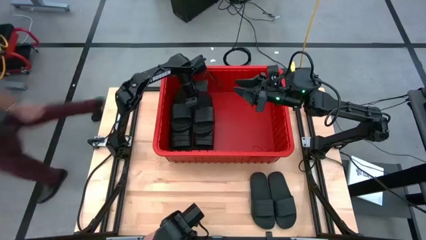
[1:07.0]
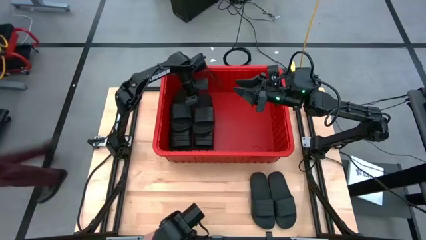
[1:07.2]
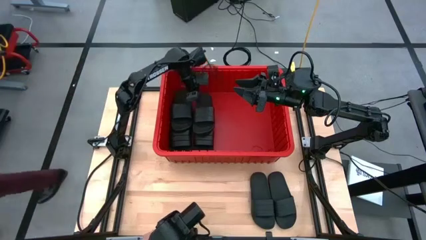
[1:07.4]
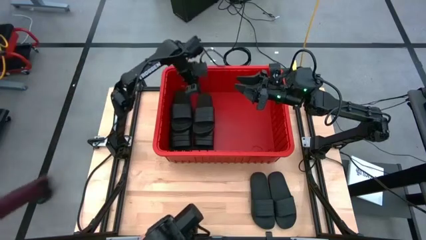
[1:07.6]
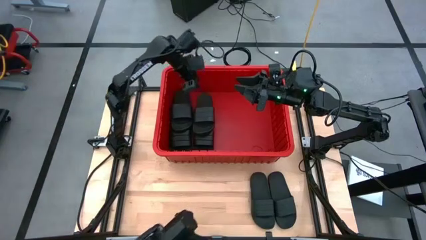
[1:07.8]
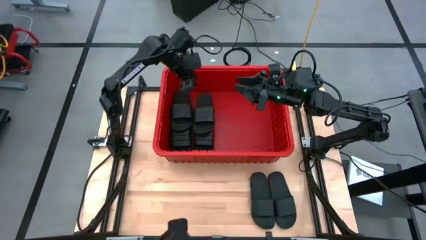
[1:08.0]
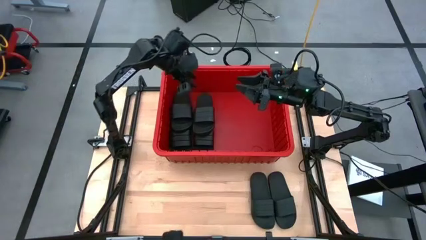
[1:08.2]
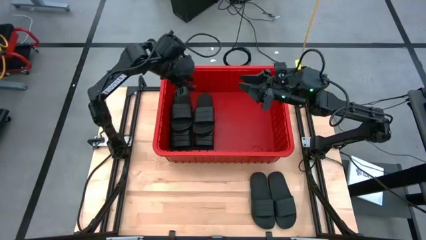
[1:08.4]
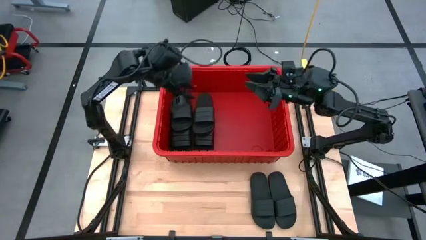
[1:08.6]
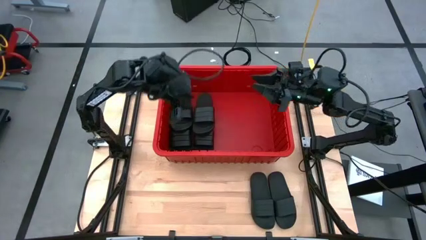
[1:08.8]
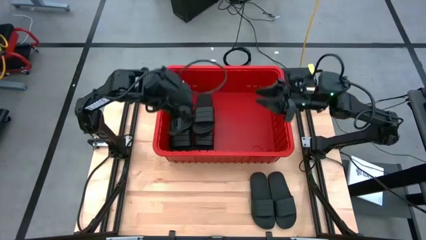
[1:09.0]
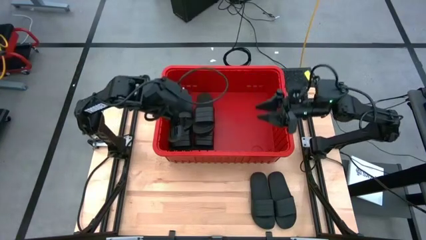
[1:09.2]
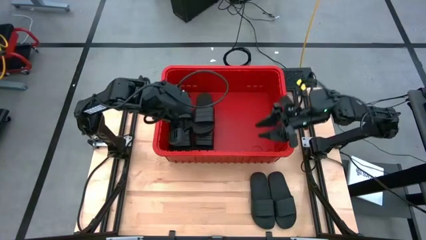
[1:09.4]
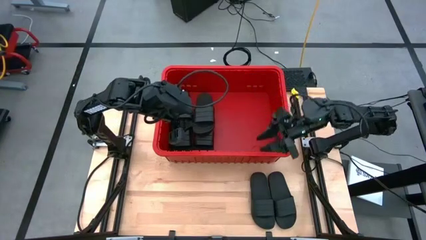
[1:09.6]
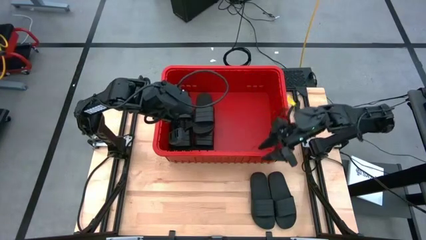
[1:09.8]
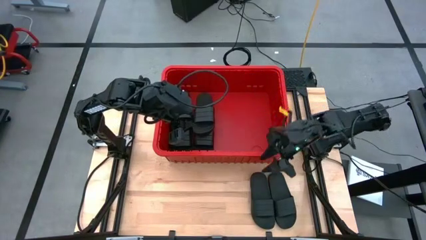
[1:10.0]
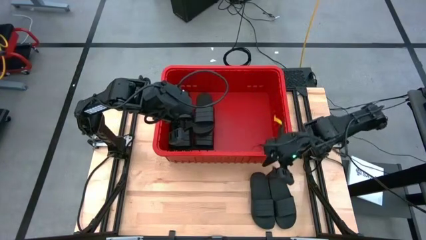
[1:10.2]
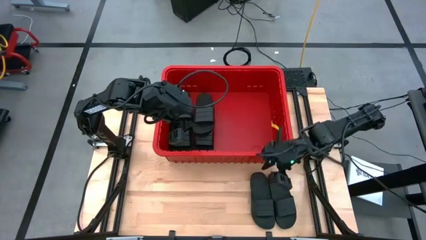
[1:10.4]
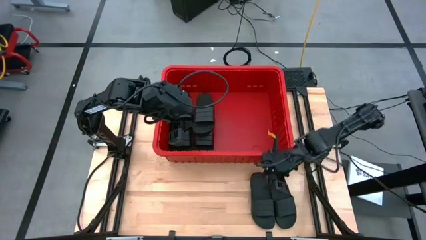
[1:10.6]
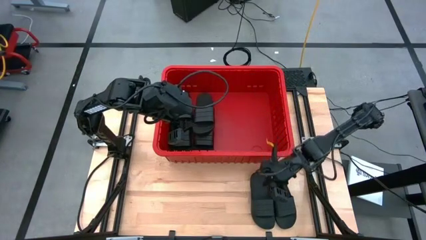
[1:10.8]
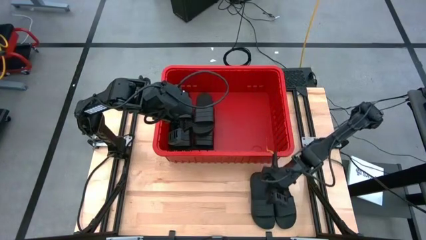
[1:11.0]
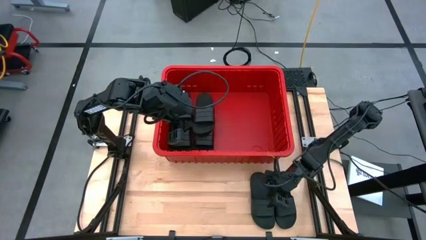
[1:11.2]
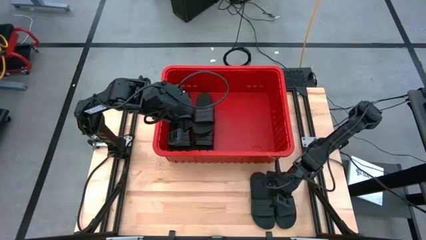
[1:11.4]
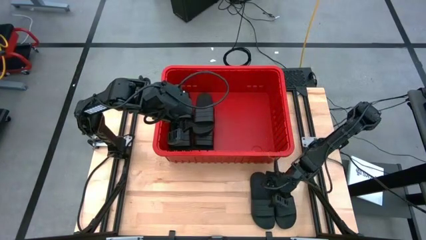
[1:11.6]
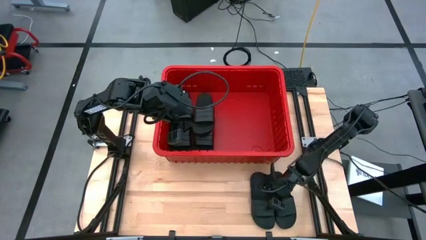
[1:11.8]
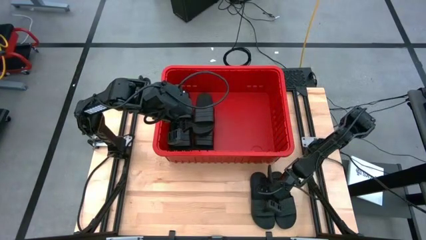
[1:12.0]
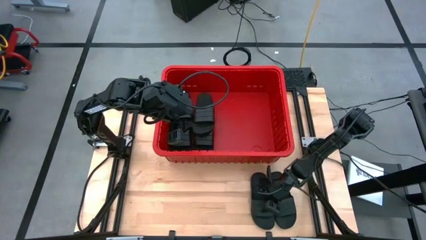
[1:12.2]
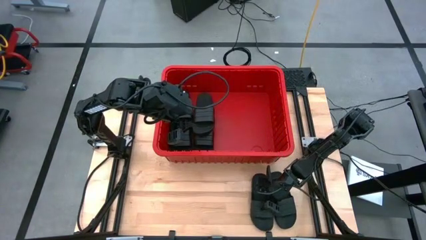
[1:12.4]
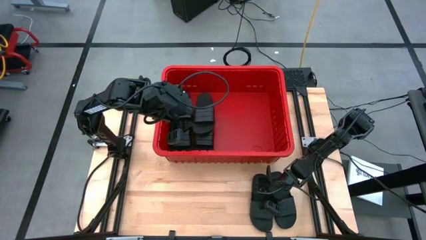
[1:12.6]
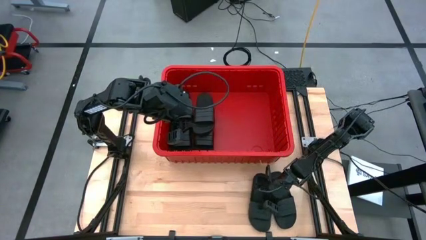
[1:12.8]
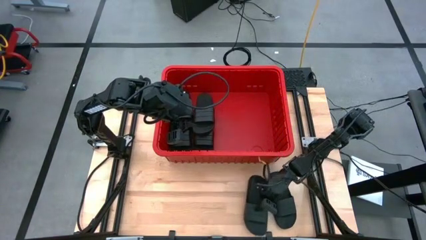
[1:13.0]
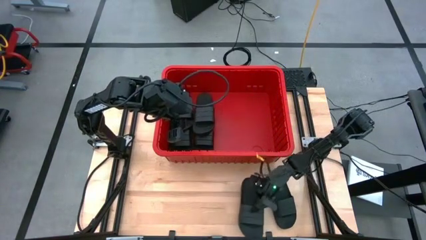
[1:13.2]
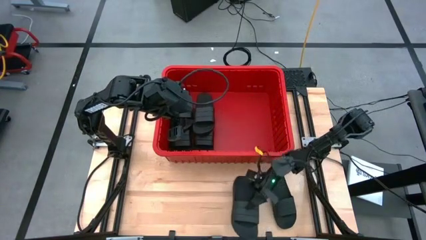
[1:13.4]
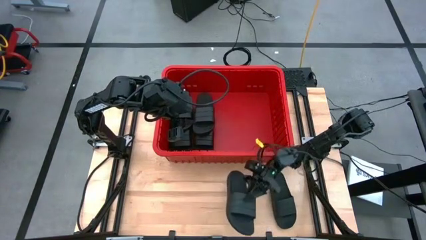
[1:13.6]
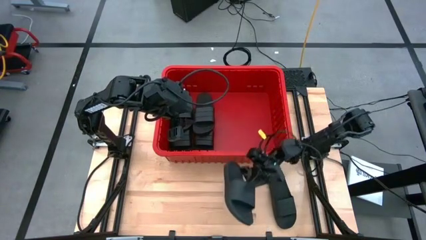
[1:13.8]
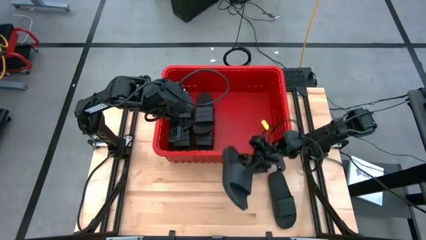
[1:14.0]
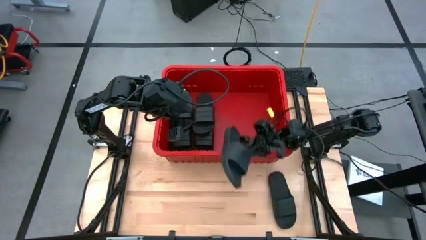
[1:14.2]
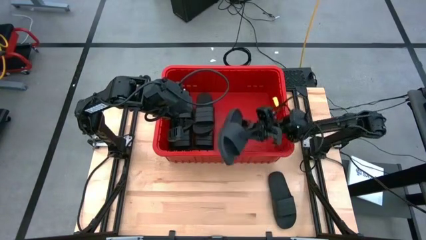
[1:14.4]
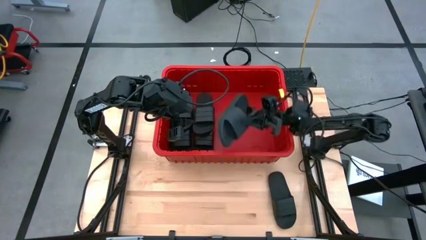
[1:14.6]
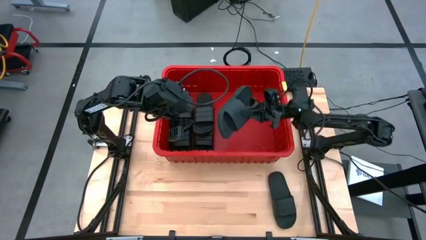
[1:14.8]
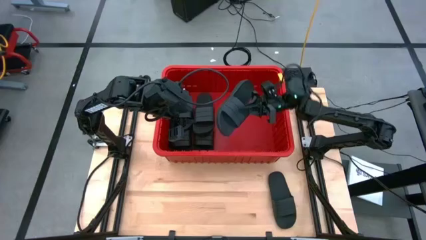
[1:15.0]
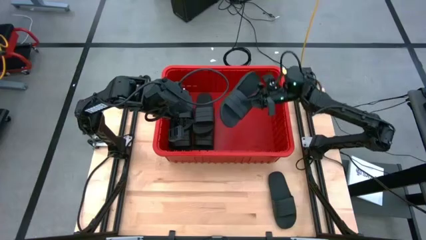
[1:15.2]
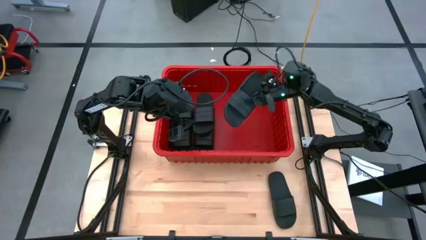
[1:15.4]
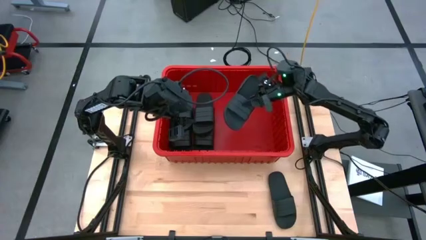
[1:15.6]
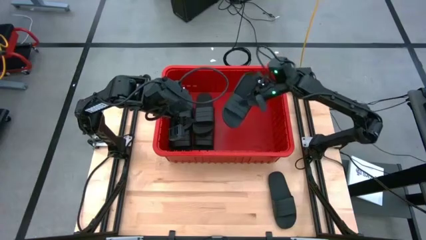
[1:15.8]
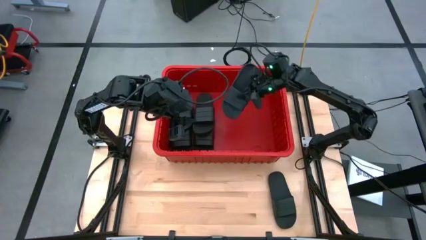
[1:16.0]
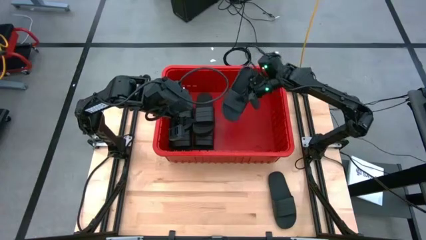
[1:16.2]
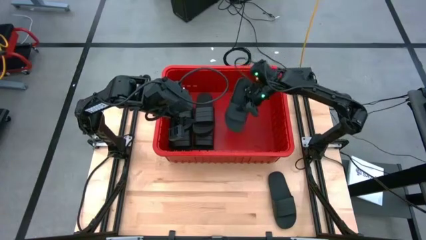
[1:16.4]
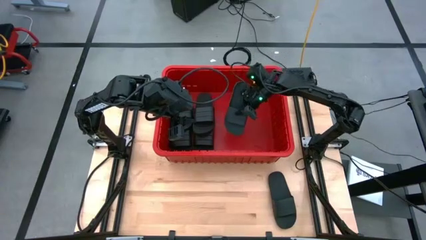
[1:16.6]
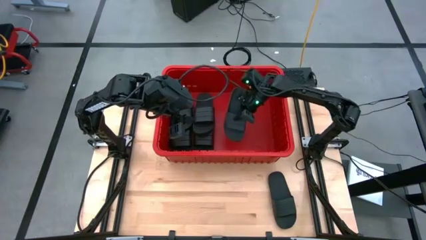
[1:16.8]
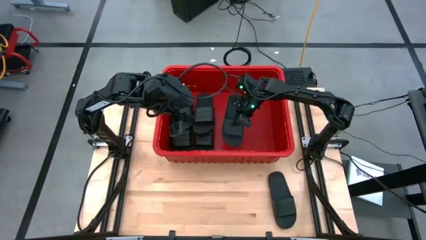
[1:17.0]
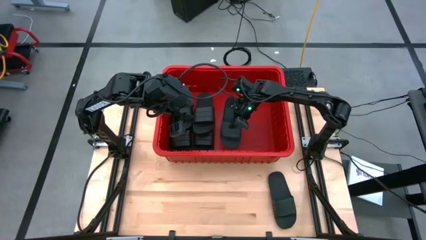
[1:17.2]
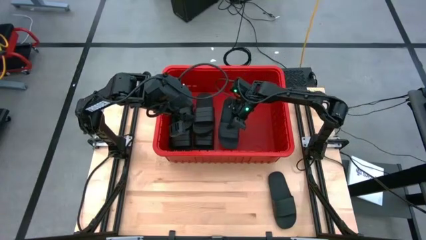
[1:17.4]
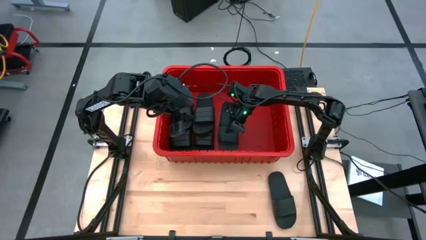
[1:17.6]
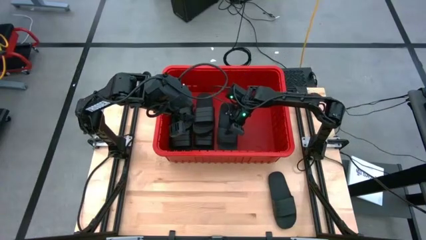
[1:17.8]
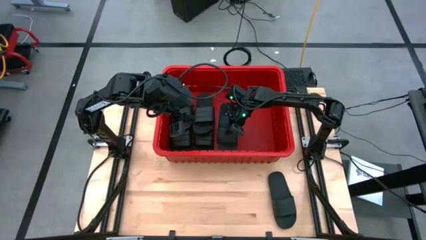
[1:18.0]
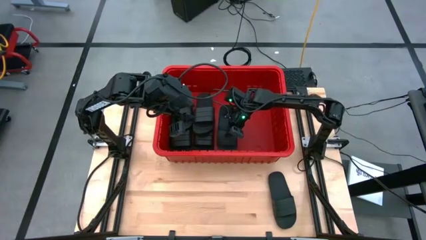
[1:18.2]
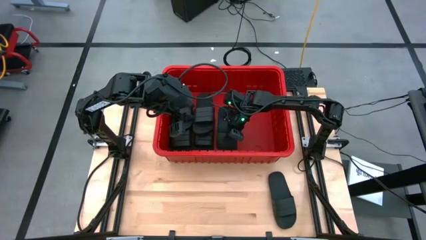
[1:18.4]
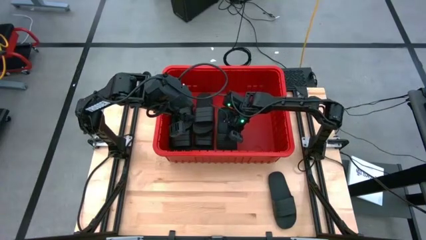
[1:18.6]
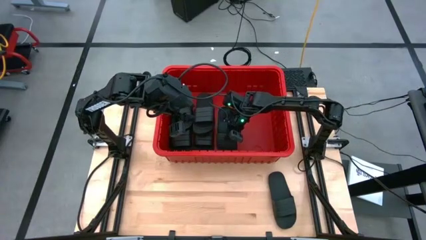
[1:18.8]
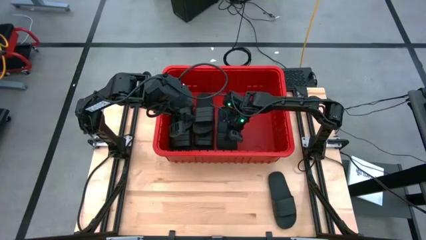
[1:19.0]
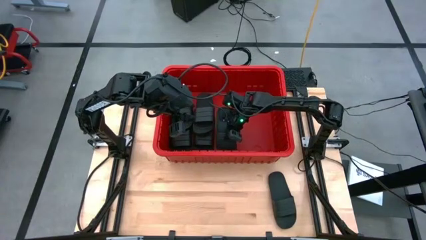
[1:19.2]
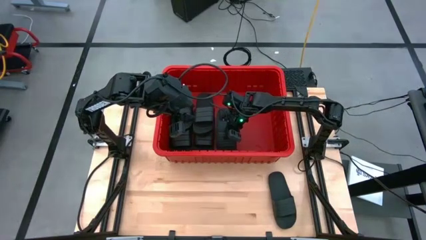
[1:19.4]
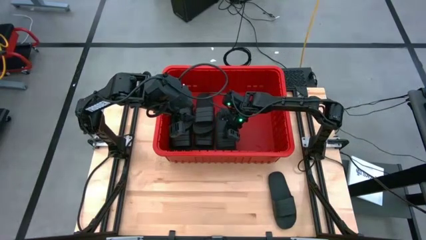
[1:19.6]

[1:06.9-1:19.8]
Task: Pick and place slides into bin
Put the black slide into the red bin

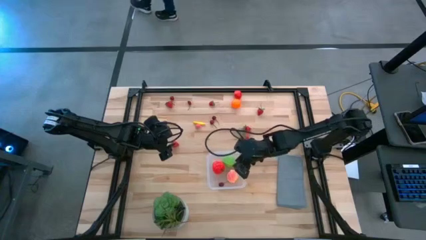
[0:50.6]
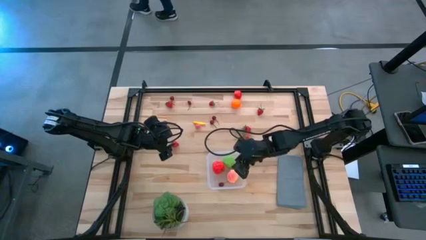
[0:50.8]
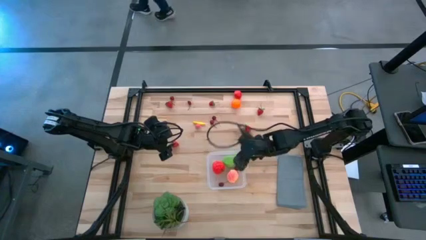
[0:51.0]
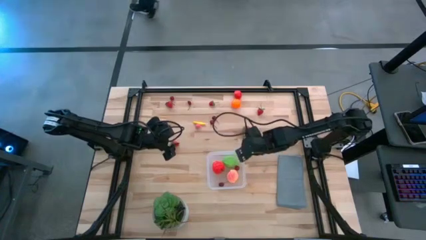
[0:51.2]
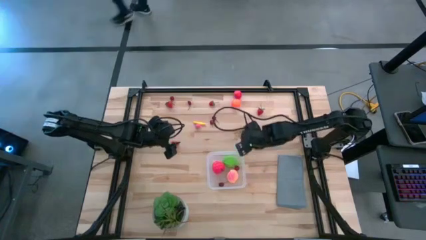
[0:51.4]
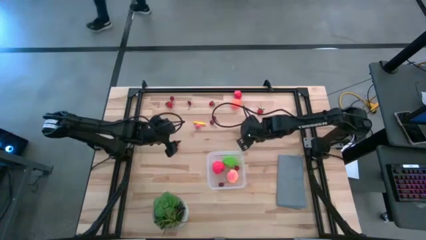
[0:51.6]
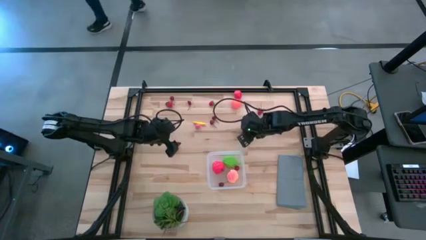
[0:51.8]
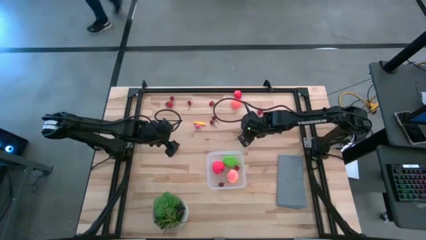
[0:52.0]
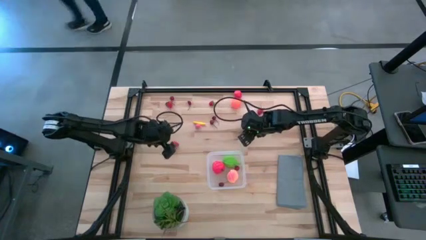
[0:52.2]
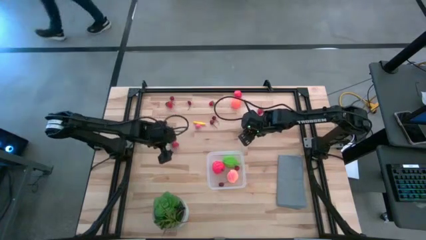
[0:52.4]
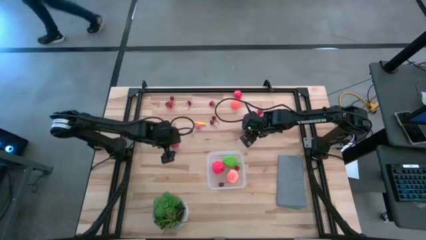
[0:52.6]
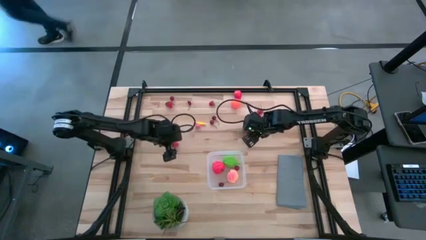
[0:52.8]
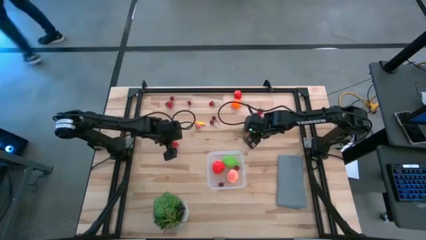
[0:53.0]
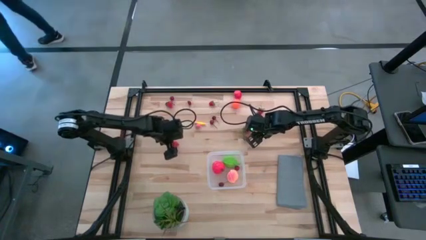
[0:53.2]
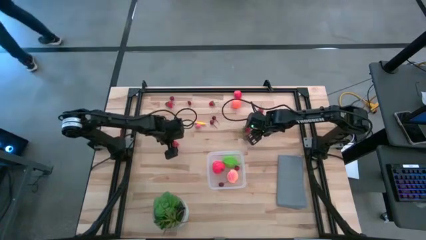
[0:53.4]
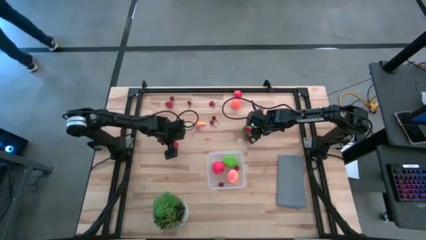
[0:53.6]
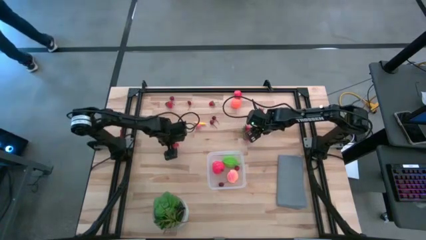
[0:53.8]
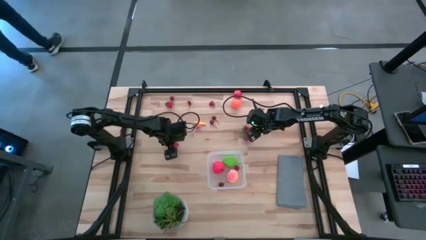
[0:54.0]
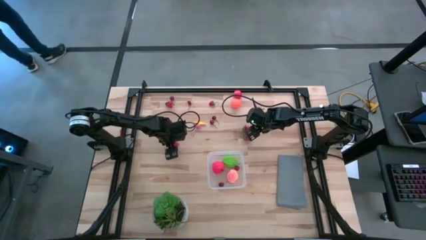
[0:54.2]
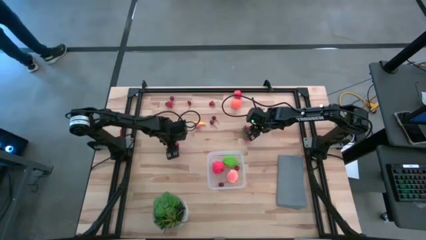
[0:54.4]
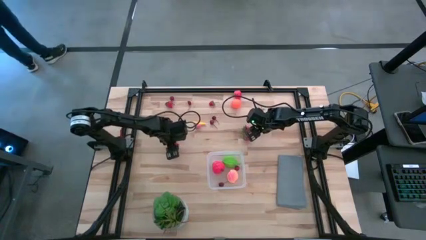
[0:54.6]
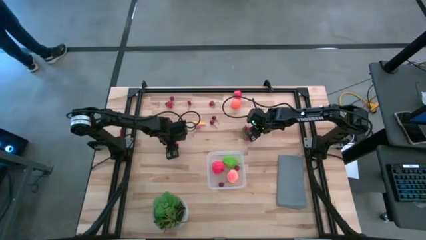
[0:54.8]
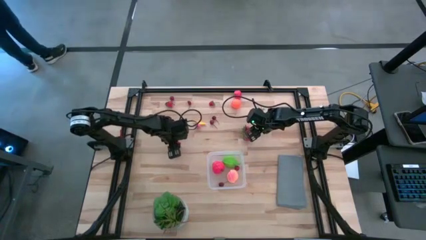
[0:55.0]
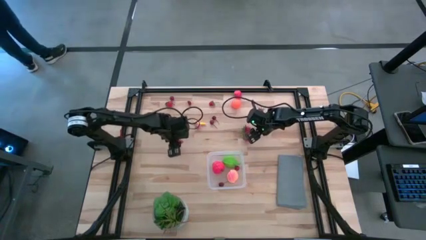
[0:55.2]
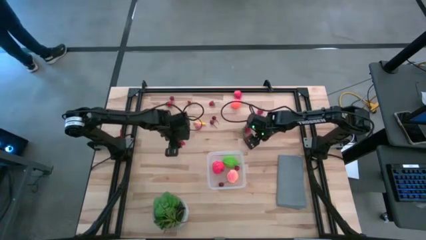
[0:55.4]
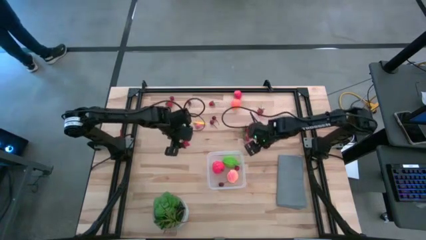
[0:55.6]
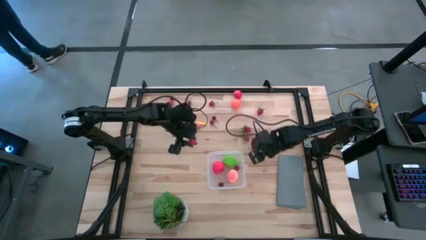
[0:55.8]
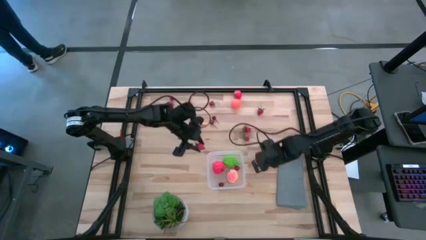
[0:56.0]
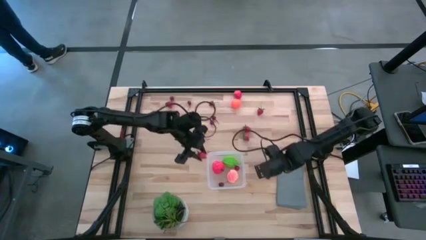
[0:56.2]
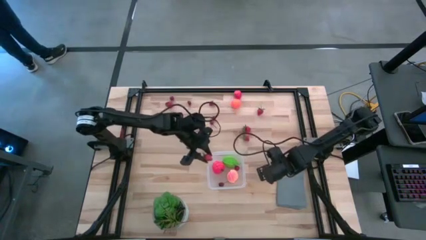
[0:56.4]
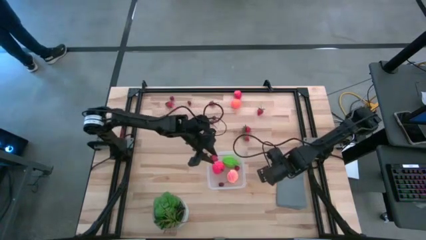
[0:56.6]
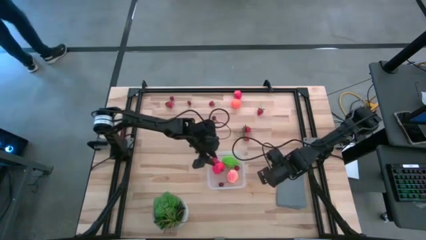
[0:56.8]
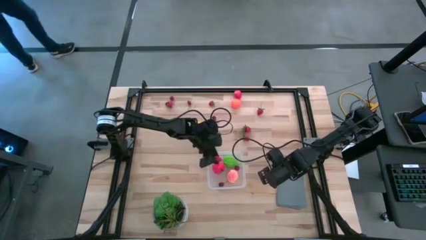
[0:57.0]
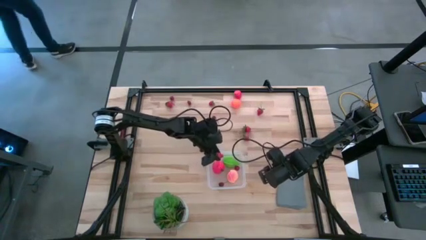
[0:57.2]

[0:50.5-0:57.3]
Task: Pick and placing Produce into tupperware
Put the red strawberry into the transparent bin
